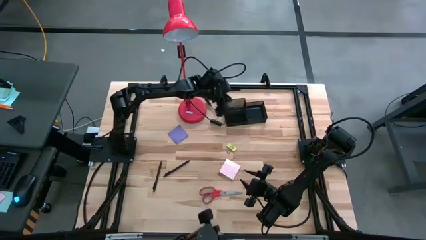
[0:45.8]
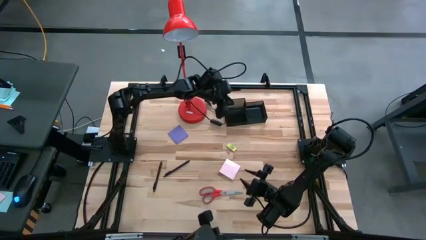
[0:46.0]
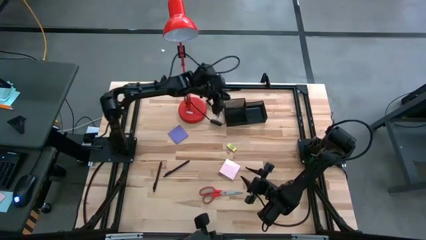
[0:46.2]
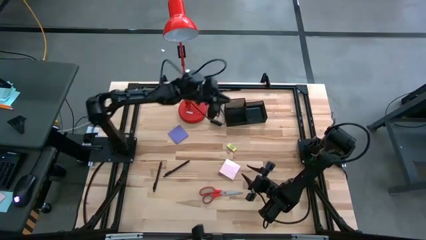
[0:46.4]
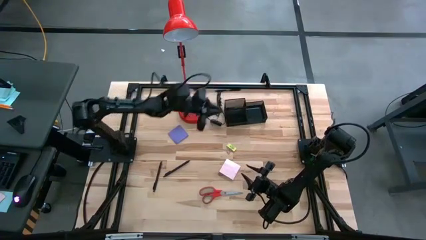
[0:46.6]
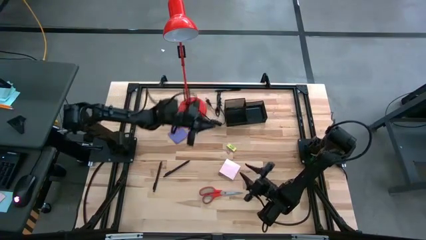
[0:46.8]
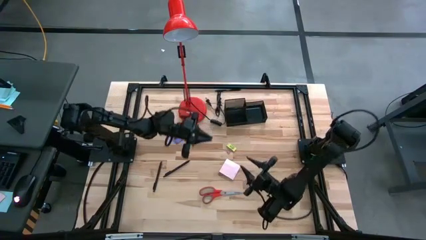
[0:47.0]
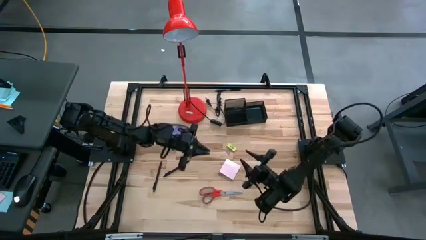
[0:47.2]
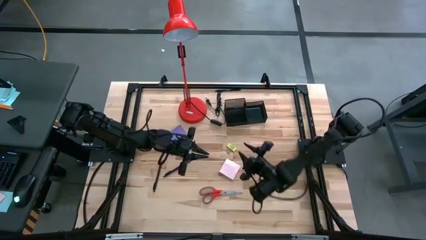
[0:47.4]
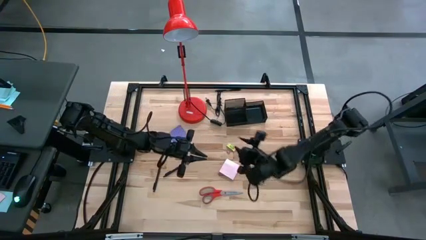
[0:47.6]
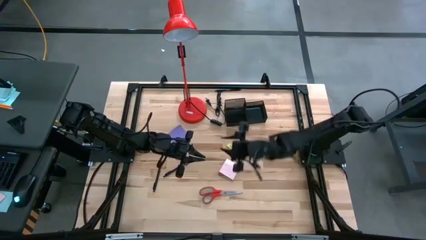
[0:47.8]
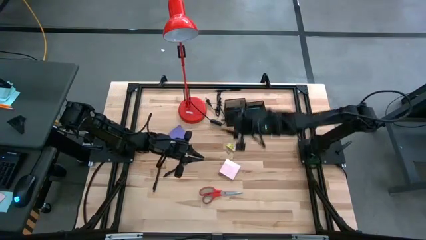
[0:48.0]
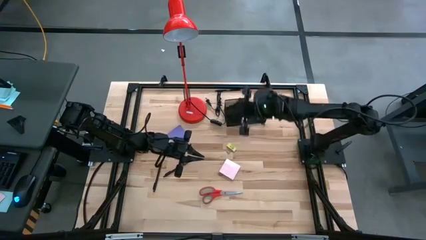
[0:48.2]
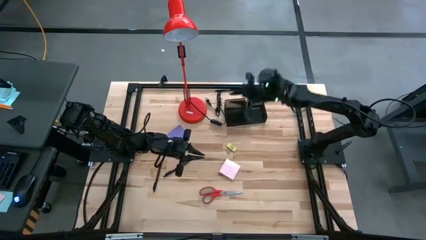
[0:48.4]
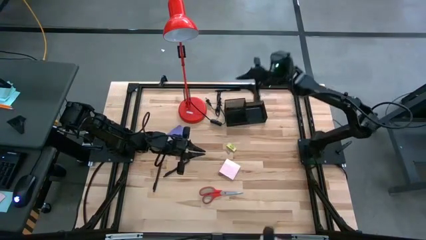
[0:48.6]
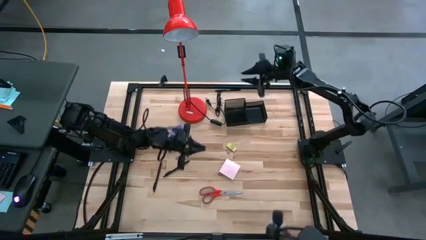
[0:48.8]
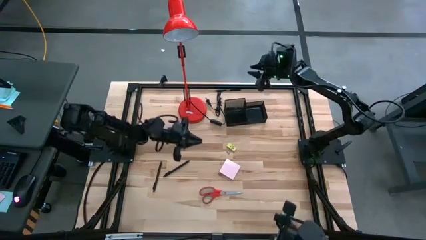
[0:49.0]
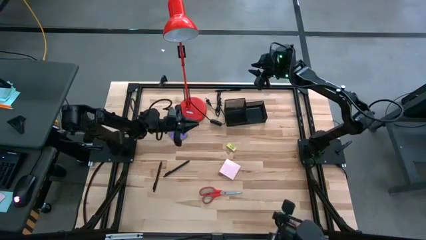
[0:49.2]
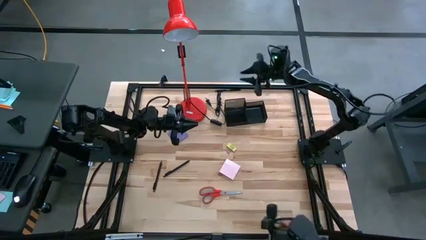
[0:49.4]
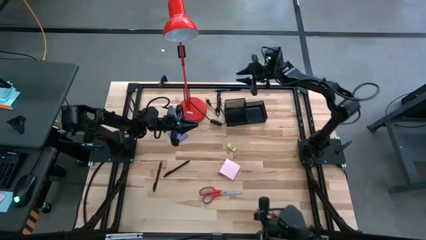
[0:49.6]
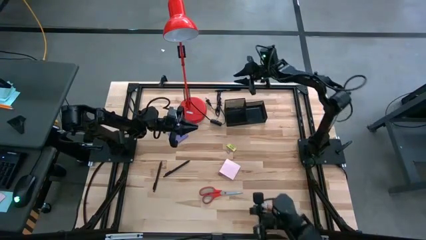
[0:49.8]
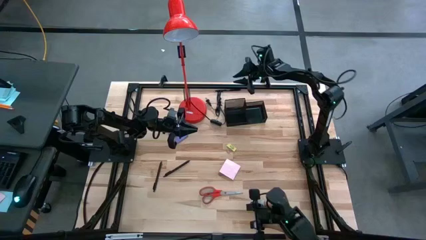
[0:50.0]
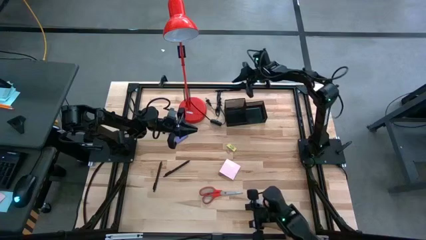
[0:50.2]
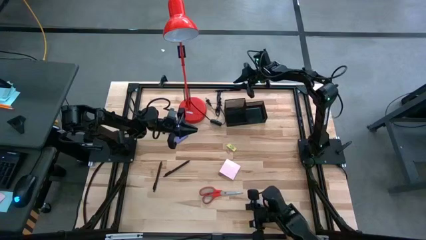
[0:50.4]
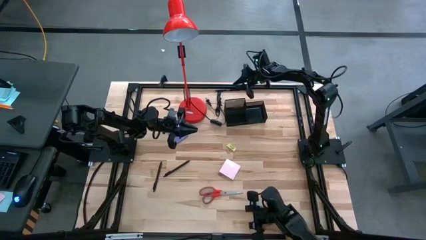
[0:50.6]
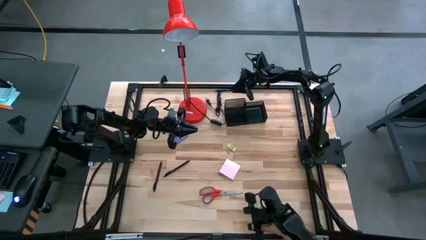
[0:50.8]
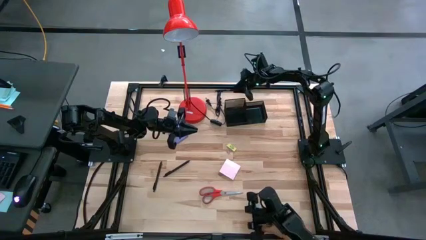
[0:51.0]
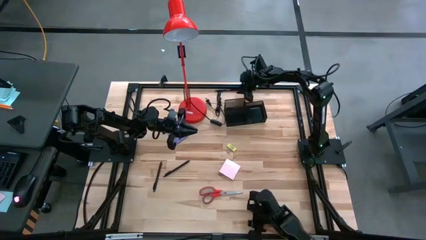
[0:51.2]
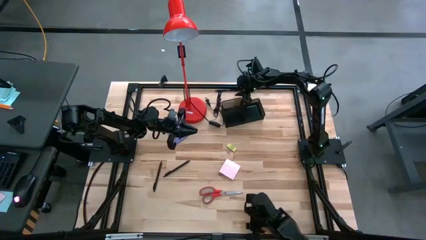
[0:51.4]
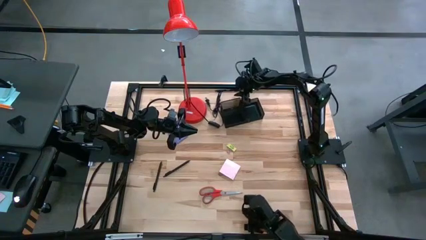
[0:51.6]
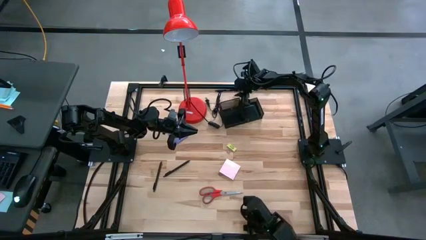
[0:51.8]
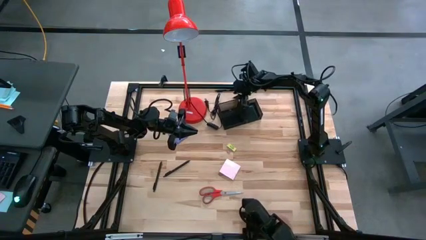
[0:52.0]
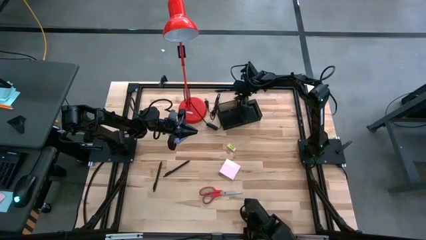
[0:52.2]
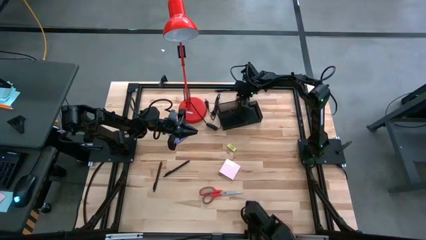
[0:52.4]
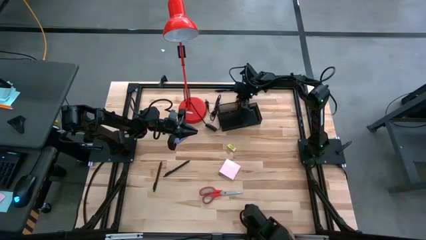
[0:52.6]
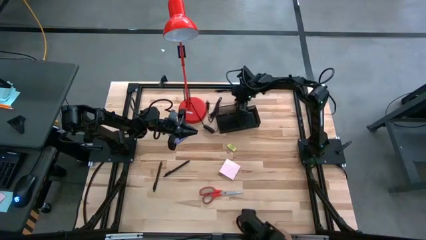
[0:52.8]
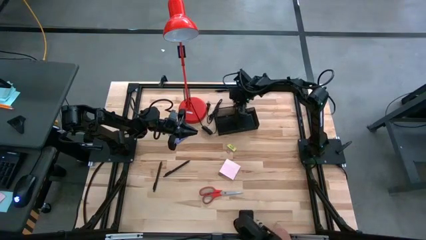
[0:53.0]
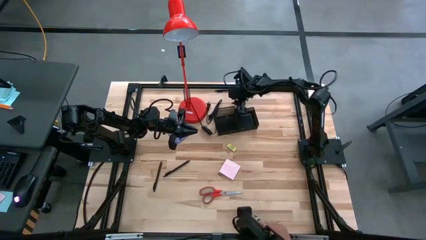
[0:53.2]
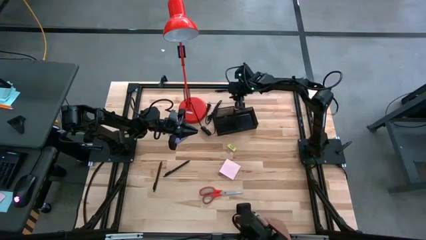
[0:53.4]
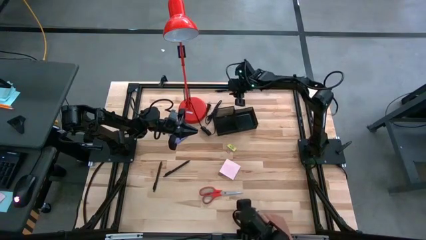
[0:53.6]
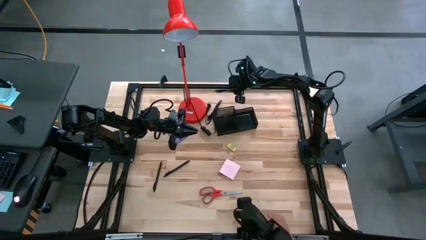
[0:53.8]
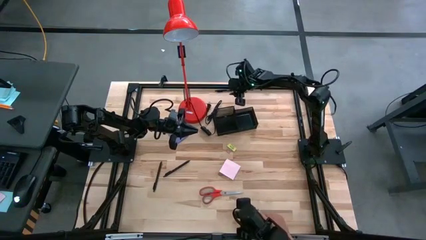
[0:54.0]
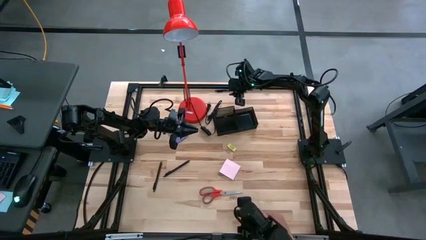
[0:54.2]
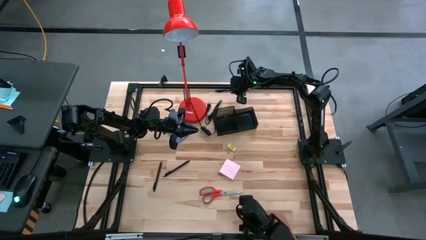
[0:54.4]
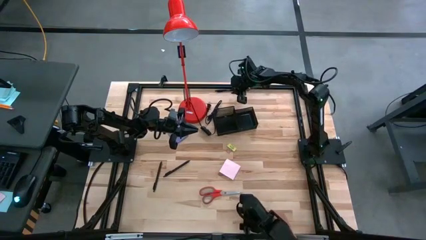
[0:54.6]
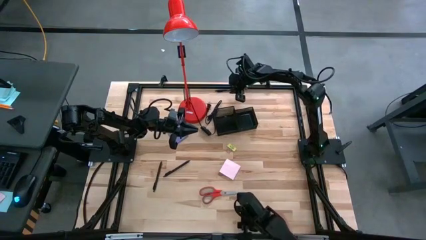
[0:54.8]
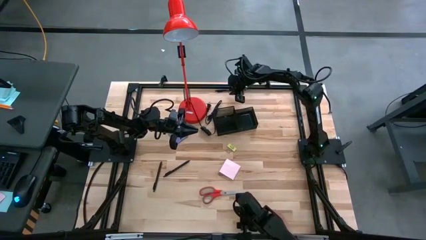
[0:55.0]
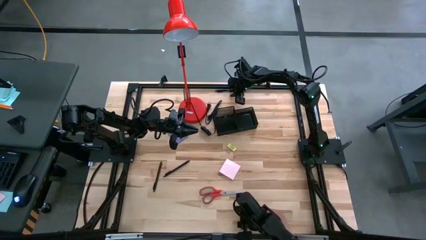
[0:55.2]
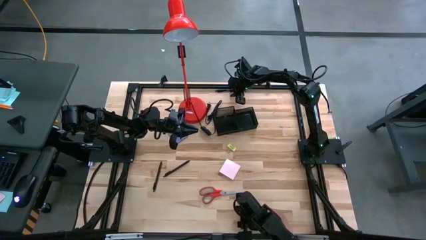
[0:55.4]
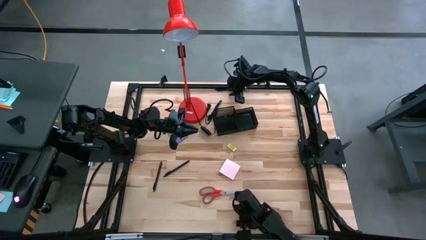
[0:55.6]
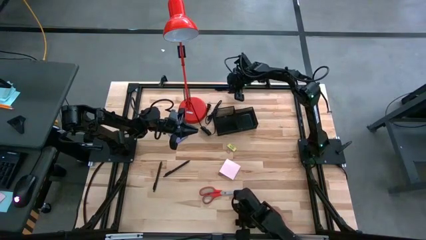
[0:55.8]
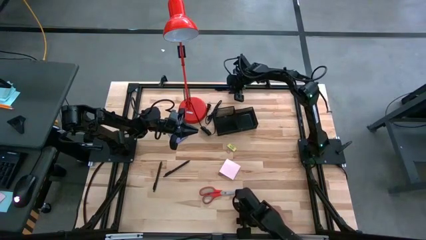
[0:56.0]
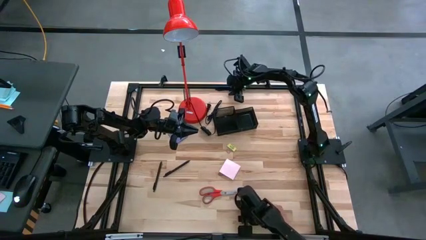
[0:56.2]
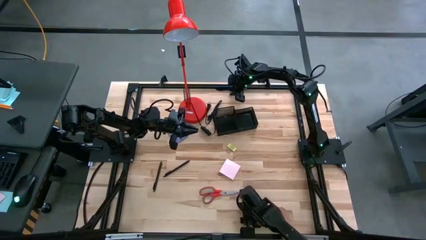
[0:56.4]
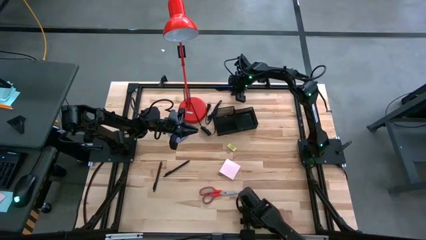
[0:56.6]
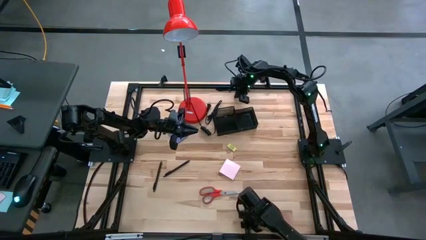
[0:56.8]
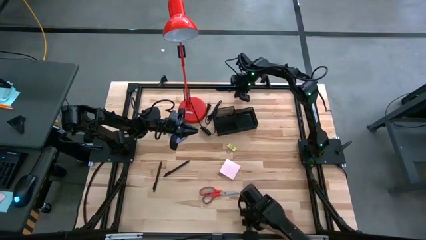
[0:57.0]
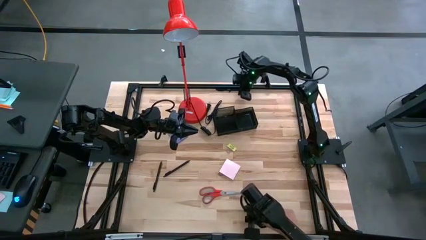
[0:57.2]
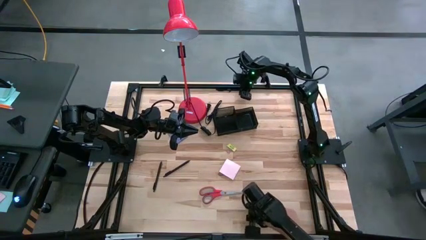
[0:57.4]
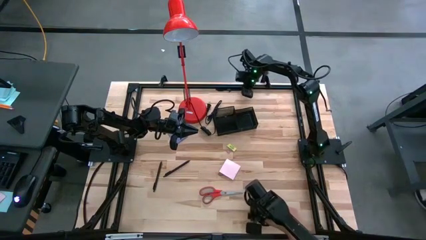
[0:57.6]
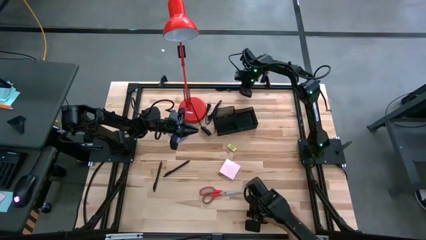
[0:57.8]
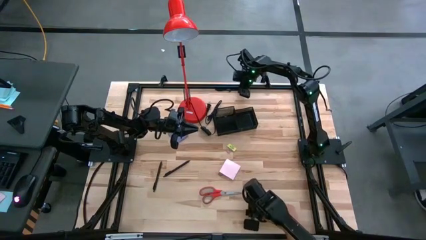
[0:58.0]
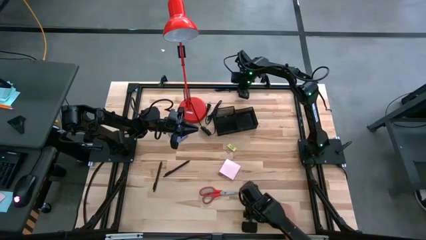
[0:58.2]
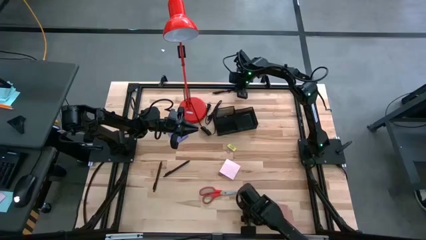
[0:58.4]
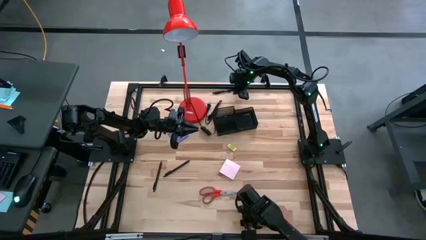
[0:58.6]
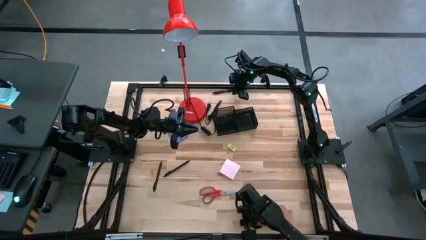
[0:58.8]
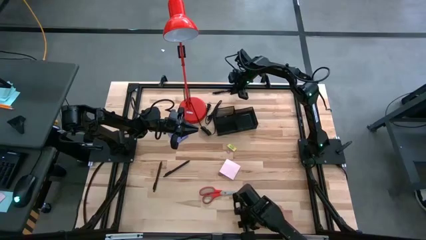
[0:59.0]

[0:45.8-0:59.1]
Task: Pick and place office supplies into organizer
Put the black pen into the black desk organizer
